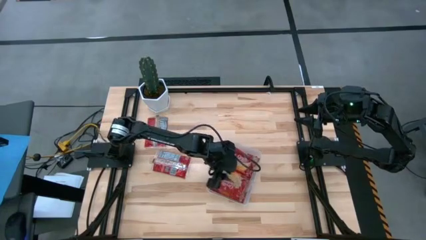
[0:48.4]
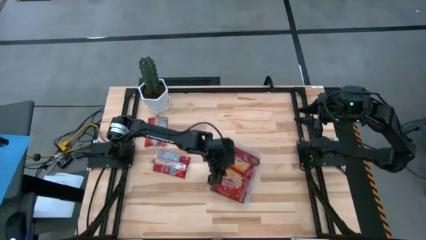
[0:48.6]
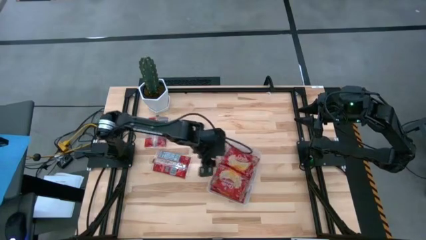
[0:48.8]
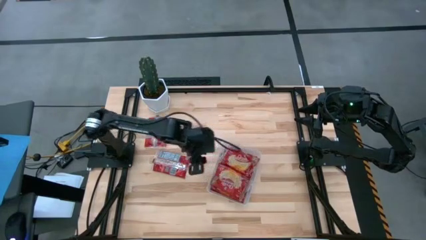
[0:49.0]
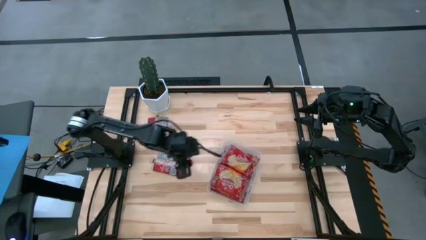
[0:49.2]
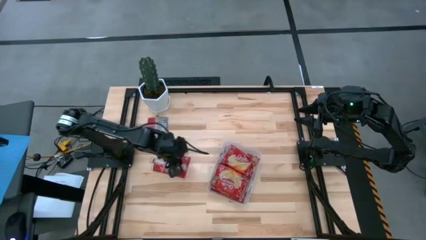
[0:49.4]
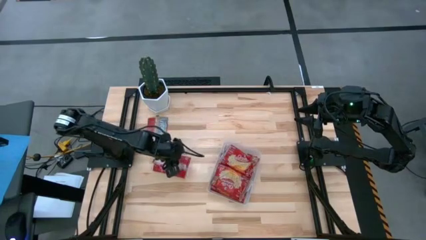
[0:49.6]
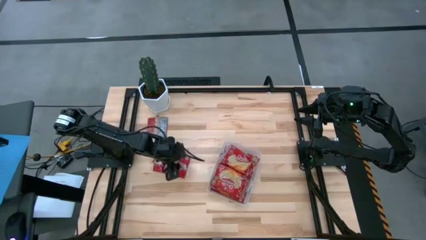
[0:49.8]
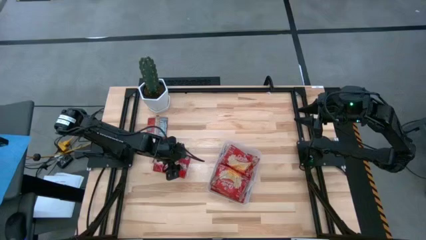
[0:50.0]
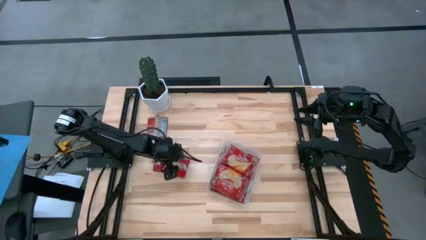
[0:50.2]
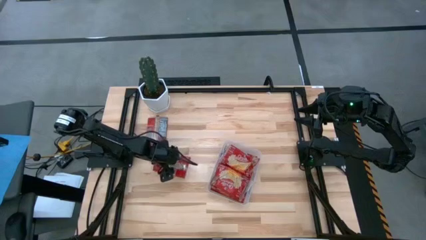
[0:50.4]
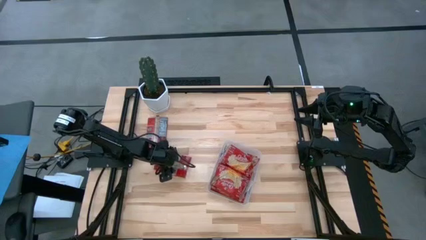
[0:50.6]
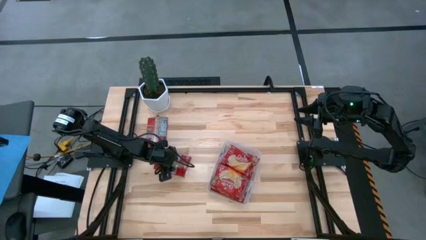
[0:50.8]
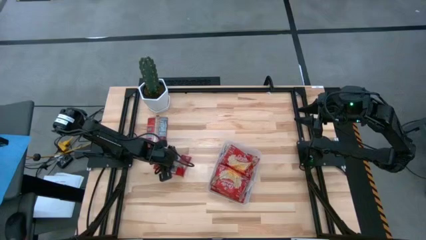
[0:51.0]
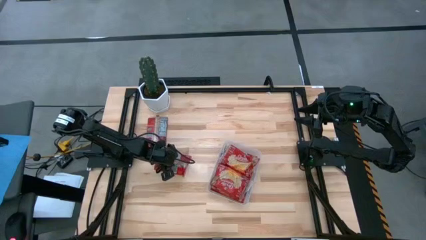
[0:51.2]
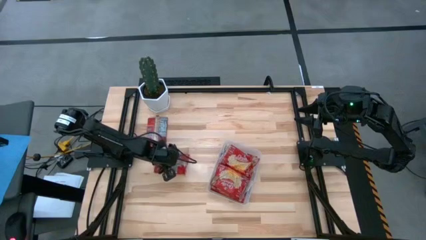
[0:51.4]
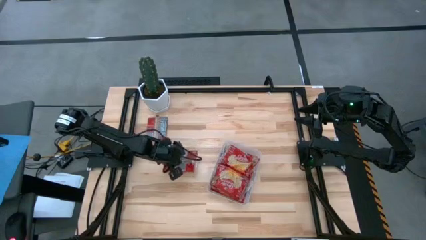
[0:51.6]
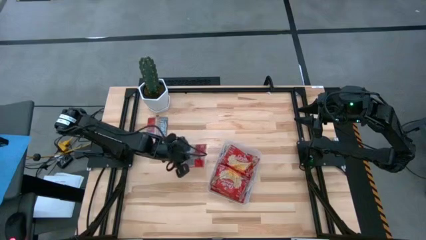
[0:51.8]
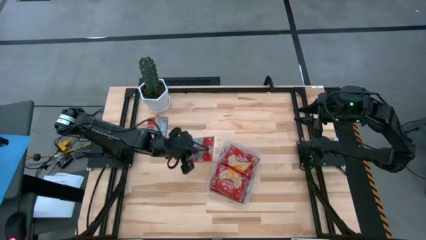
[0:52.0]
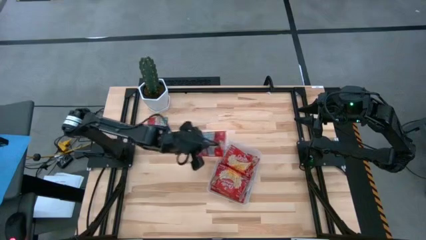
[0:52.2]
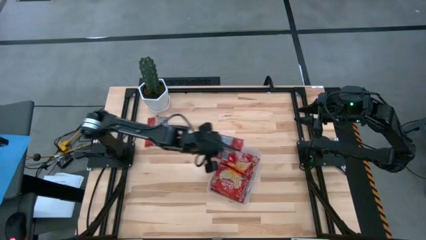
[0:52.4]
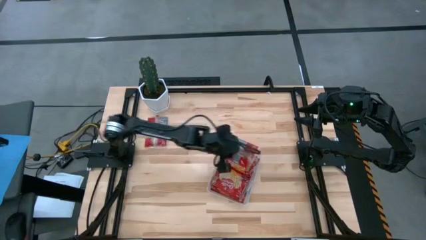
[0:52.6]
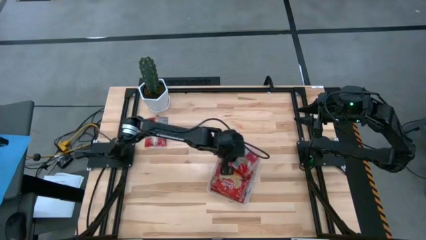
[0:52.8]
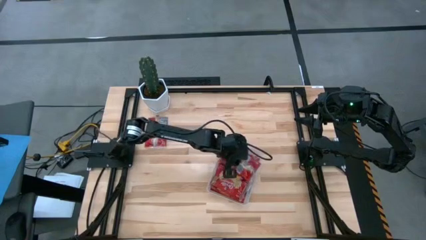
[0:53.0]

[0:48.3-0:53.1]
Task: Sort popcorn bags into baskets
Put the red popcorn bag into the transparent bin

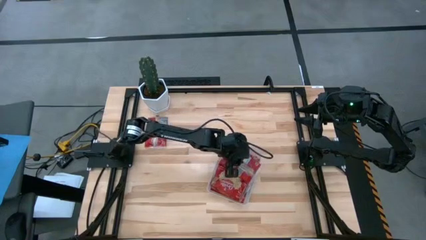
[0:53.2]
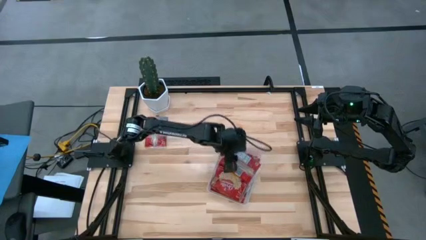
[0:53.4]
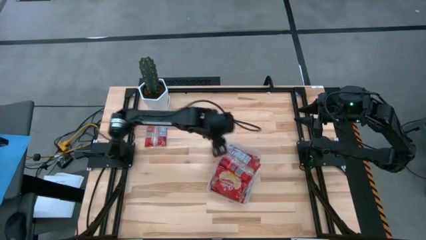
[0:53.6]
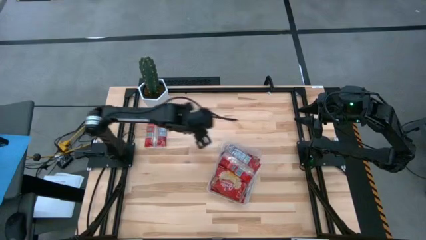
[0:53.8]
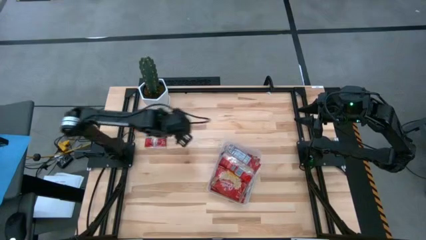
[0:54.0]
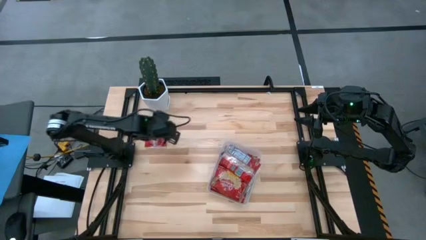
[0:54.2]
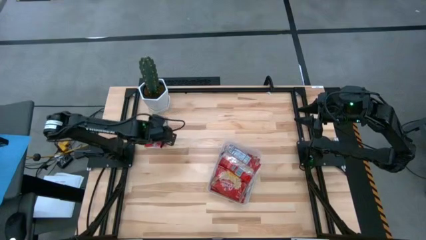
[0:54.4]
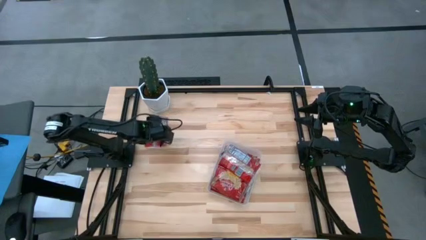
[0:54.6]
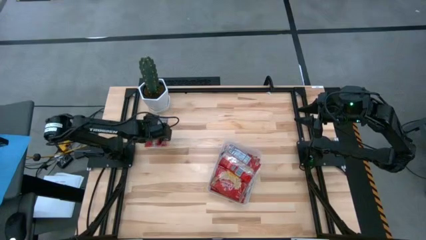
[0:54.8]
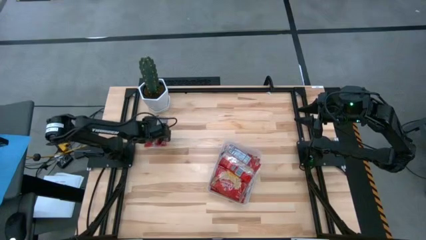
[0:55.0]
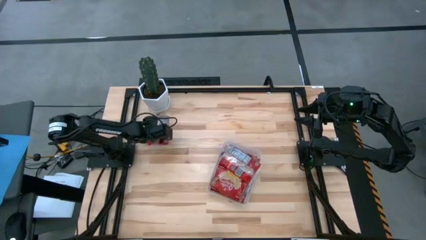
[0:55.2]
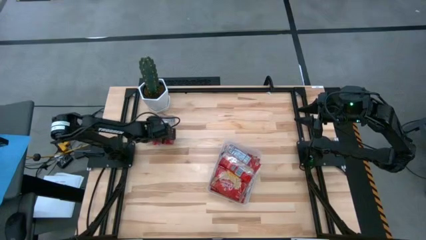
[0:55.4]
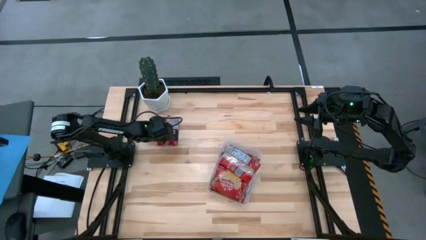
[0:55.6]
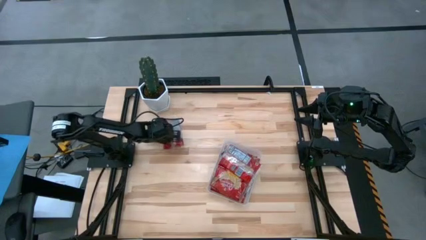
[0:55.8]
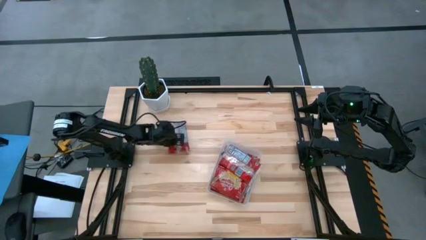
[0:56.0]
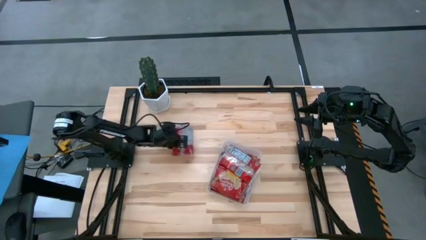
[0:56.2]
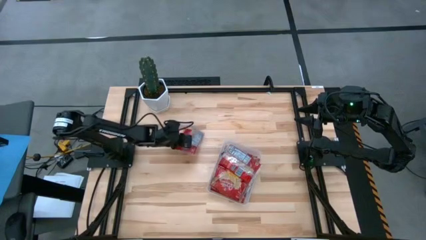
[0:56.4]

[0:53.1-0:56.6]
Put the red popcorn bag into the transparent bin

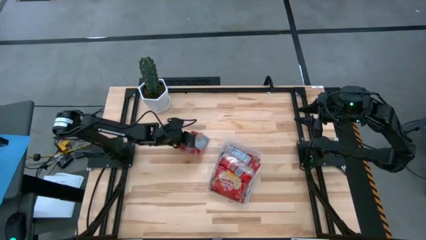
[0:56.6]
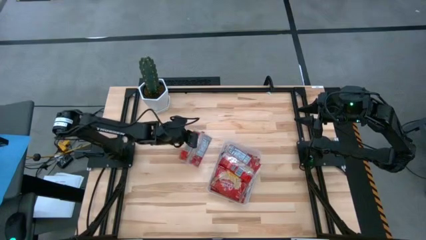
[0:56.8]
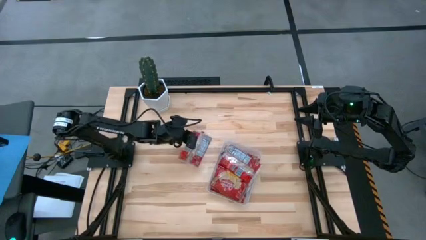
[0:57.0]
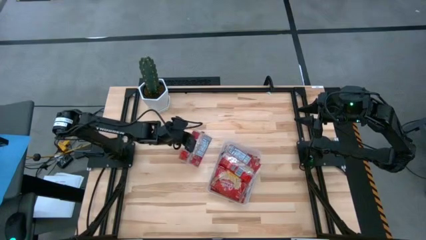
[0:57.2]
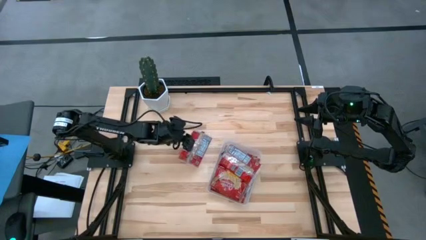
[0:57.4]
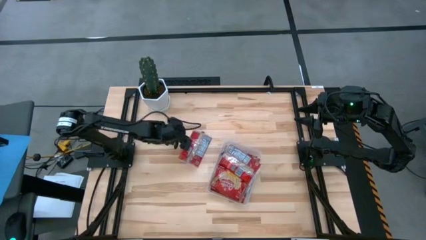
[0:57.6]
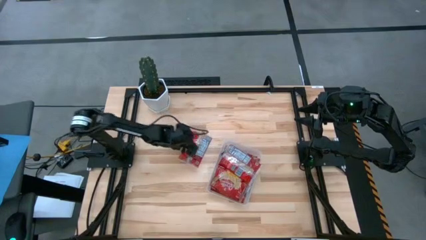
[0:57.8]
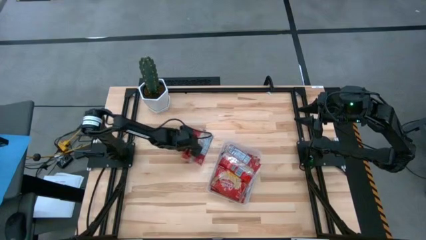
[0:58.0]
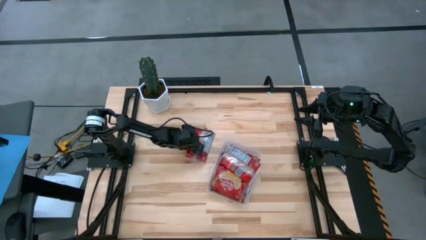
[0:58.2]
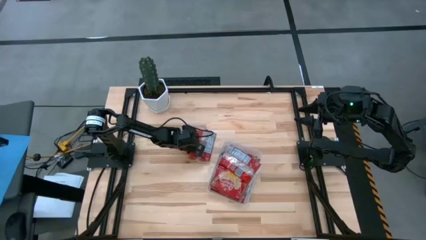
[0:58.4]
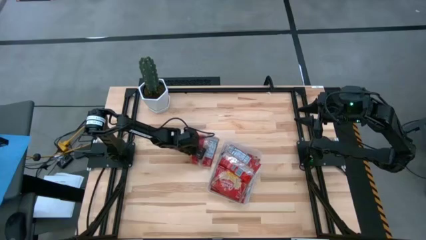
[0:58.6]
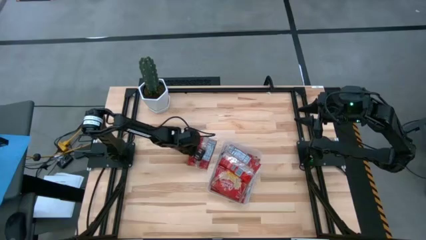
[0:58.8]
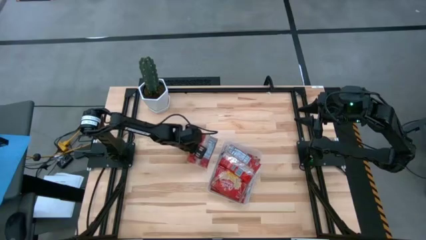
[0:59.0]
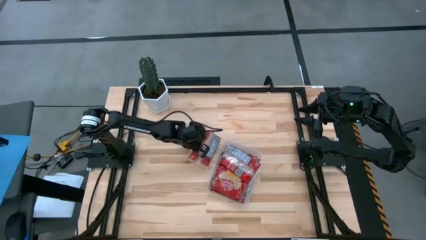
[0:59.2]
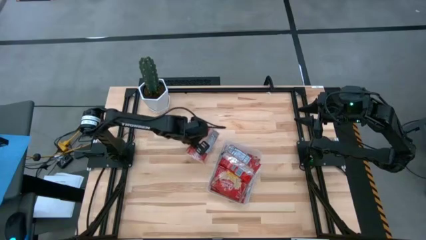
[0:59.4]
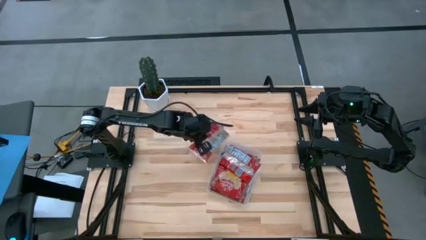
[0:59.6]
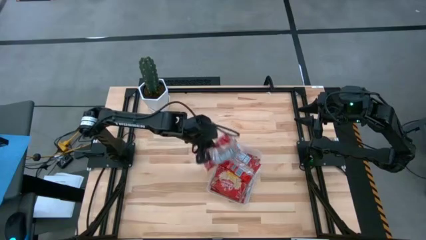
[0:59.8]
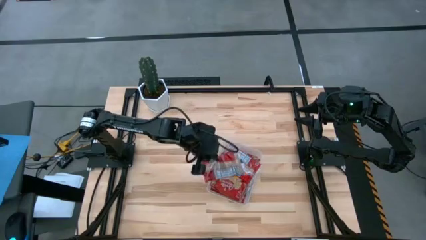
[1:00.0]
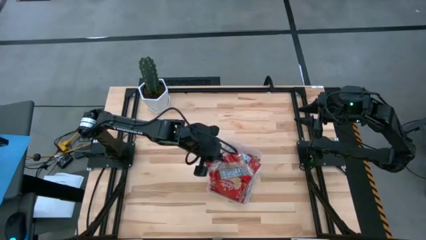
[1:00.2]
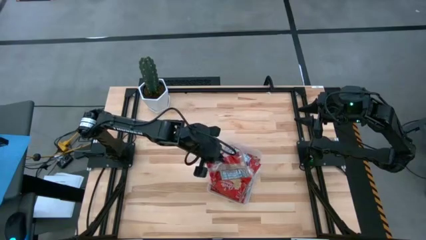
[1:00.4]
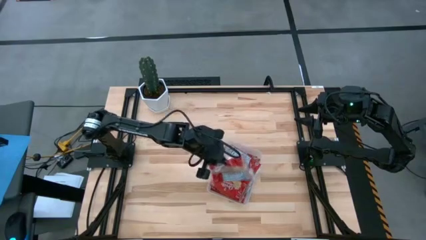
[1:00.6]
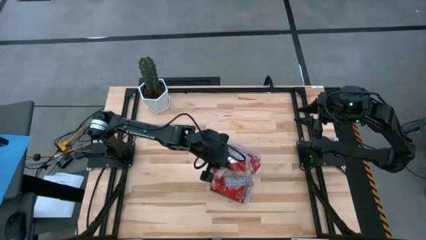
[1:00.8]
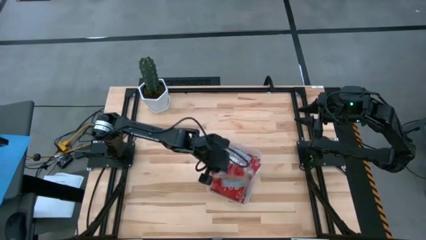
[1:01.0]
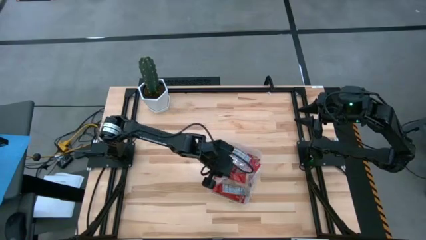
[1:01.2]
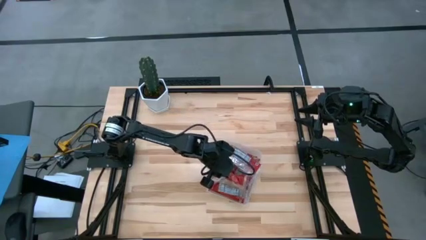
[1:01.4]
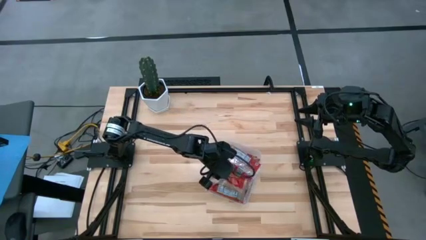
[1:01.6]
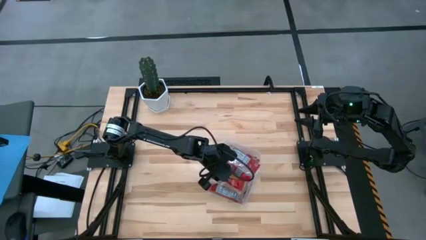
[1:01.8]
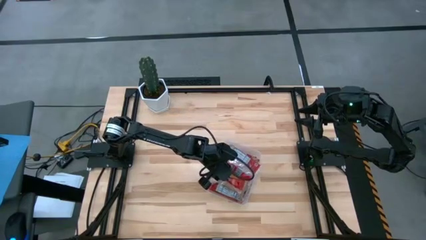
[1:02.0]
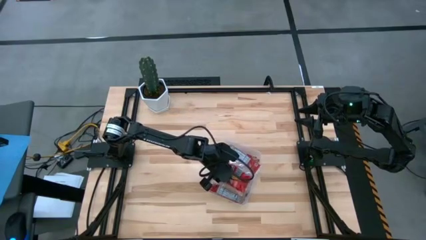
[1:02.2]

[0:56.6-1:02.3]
Put the red popcorn bag into the transparent bin

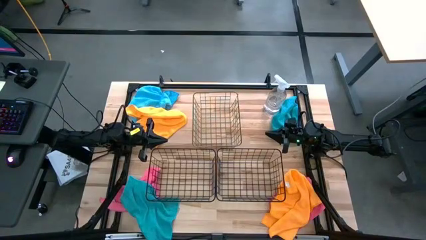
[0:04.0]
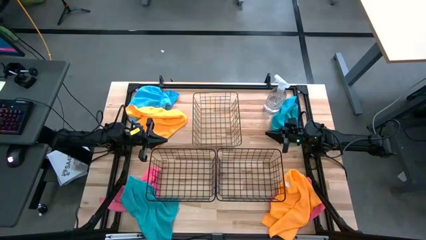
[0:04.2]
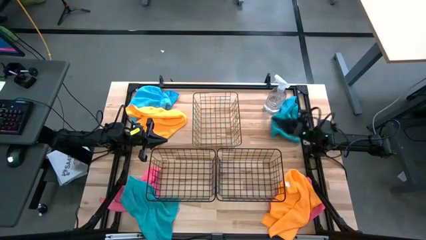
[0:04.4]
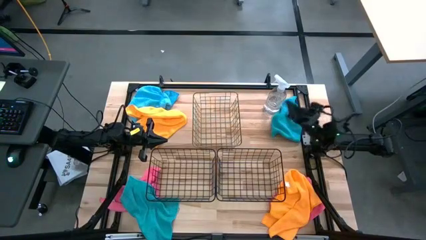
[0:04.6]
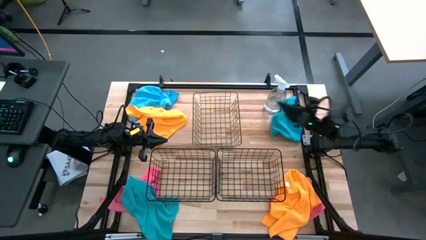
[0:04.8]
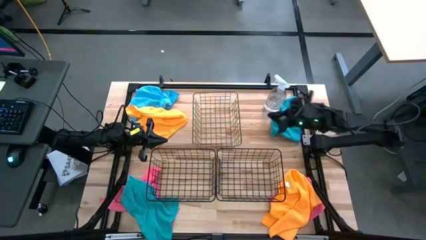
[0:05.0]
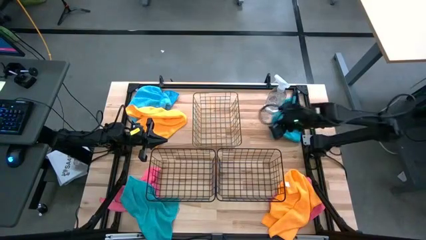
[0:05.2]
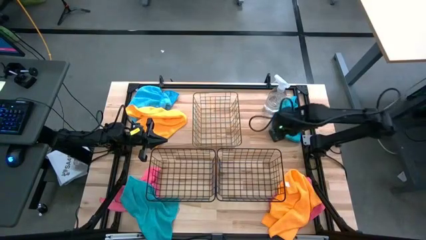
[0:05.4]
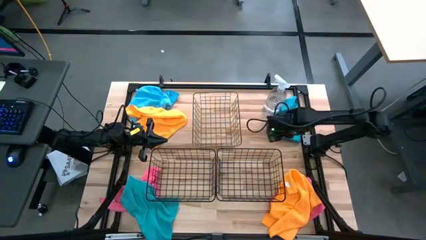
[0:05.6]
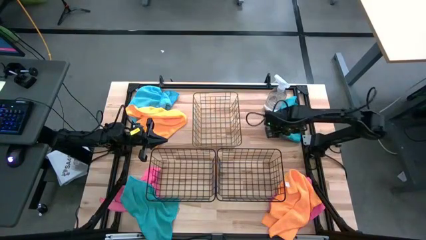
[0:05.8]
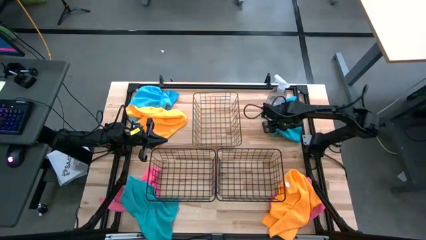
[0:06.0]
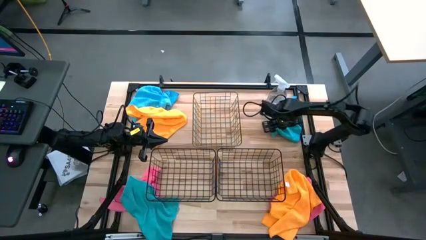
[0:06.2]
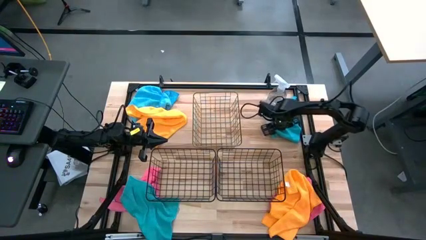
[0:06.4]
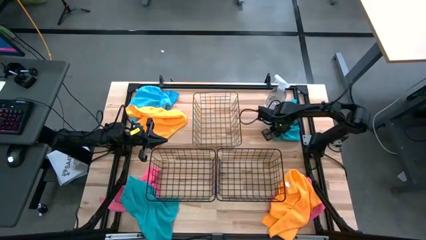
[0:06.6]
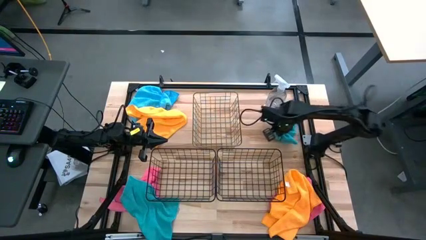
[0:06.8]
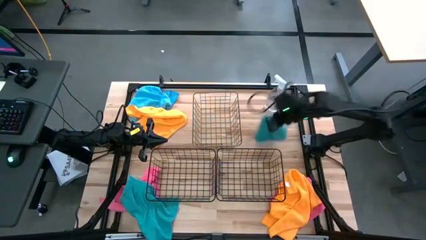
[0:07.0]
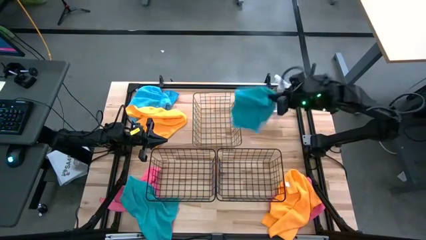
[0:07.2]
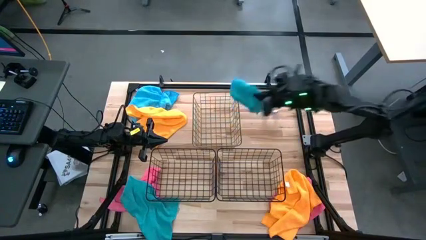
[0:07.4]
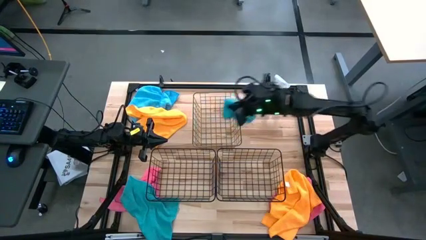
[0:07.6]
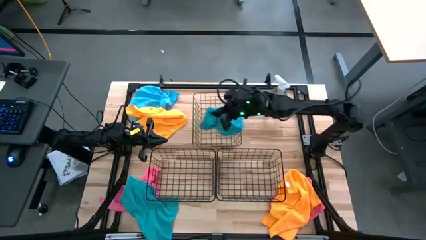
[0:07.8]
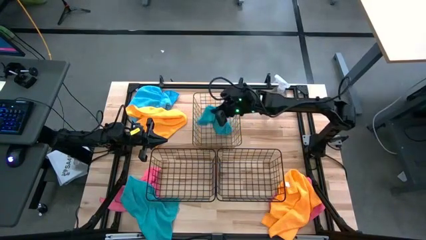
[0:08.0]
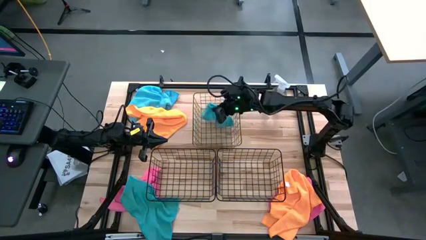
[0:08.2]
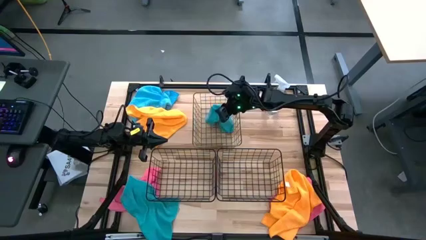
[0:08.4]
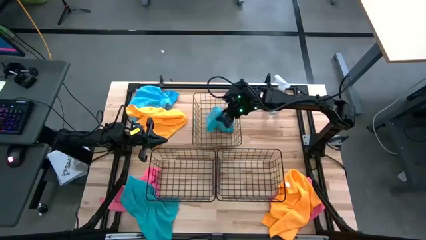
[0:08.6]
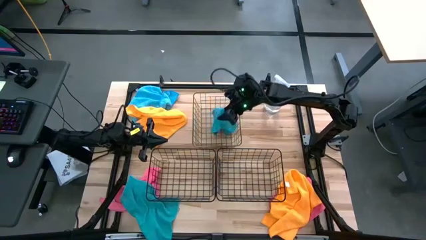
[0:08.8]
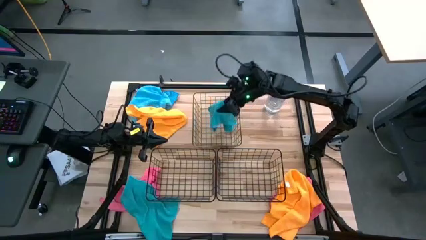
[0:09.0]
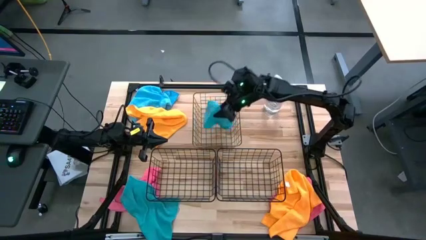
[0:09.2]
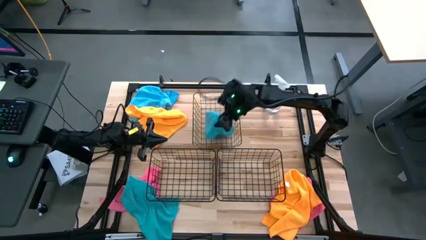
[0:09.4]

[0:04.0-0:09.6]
Task: Sort microfiber towel by color & place in baskets
Put the blue towel into the top center basket
